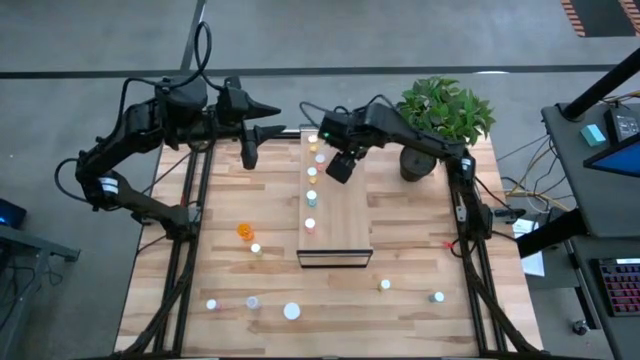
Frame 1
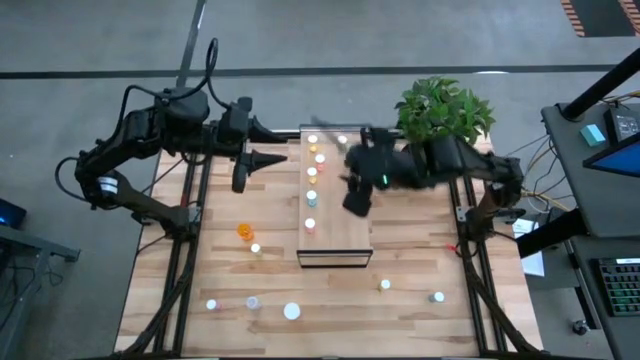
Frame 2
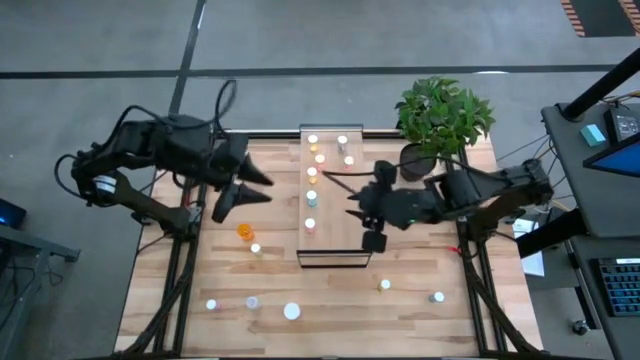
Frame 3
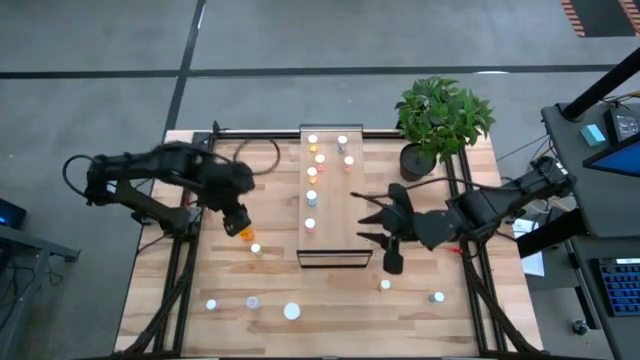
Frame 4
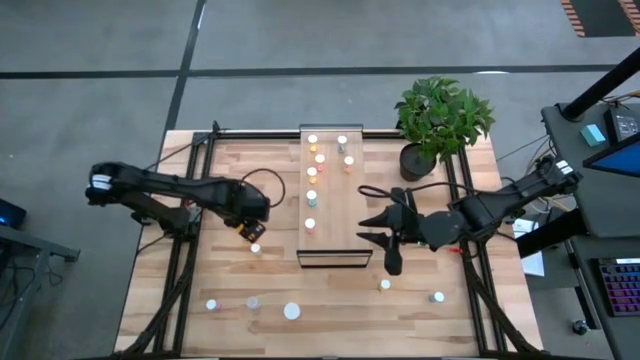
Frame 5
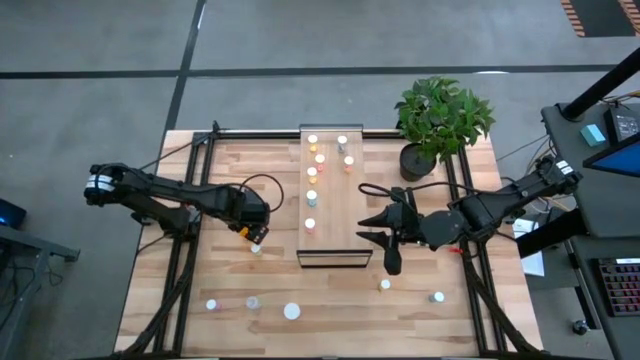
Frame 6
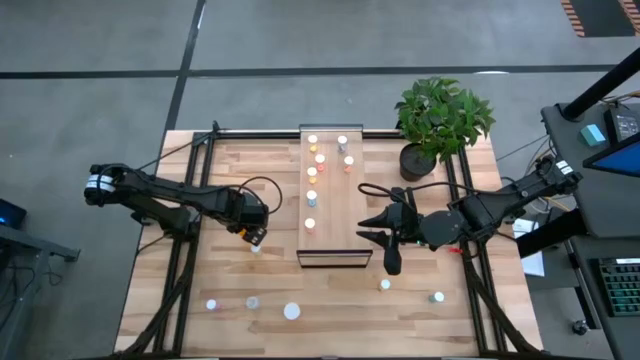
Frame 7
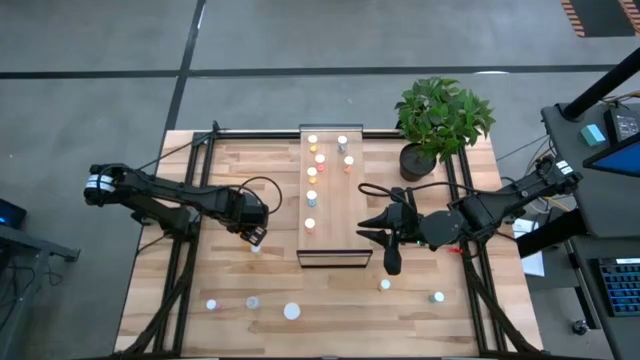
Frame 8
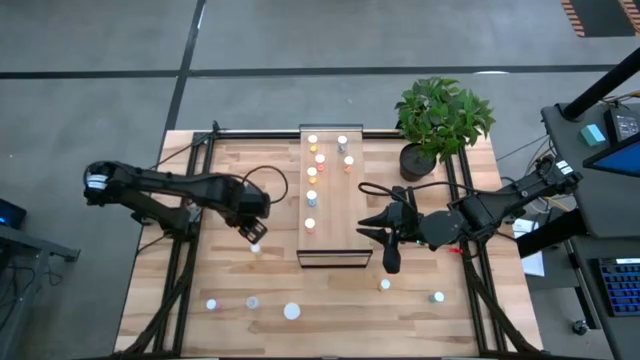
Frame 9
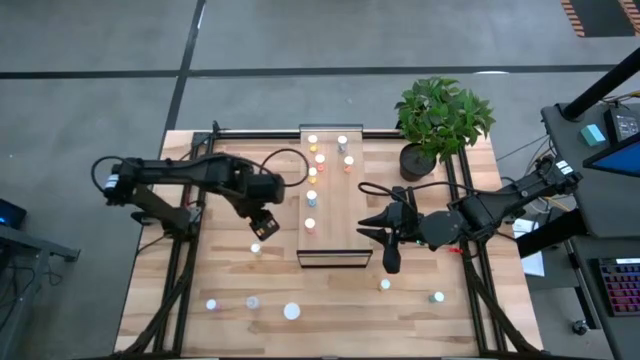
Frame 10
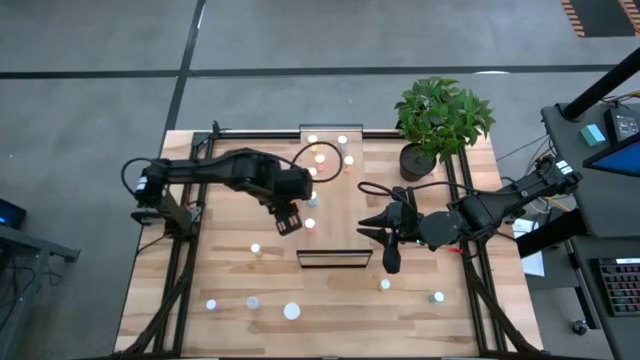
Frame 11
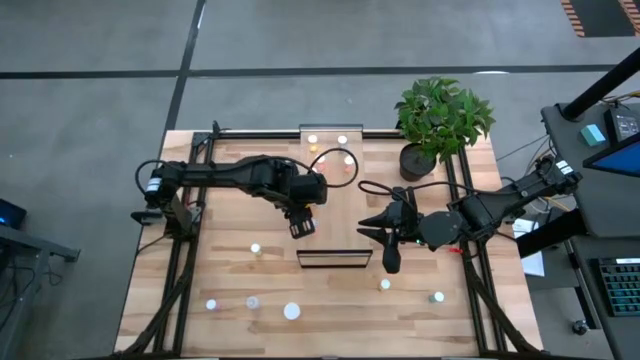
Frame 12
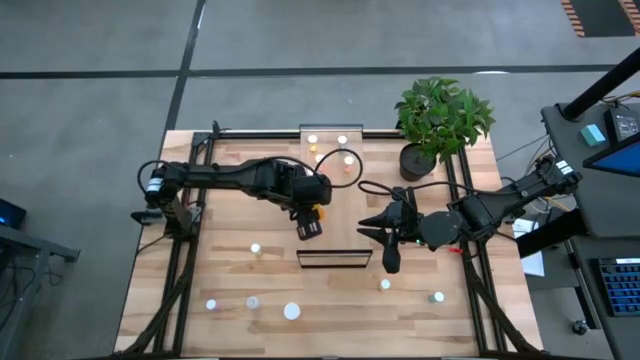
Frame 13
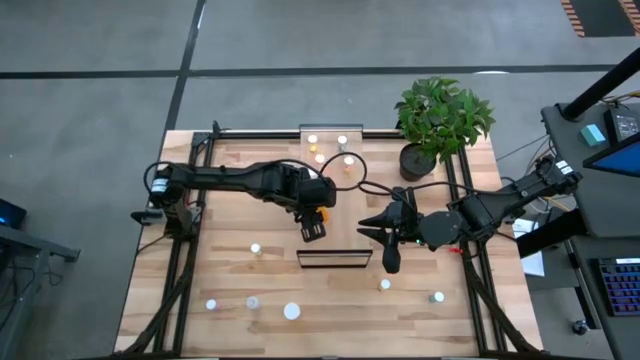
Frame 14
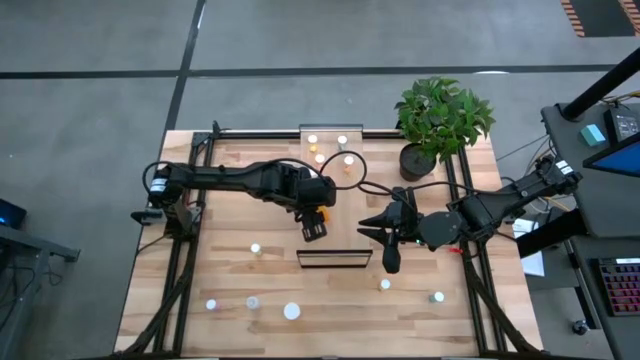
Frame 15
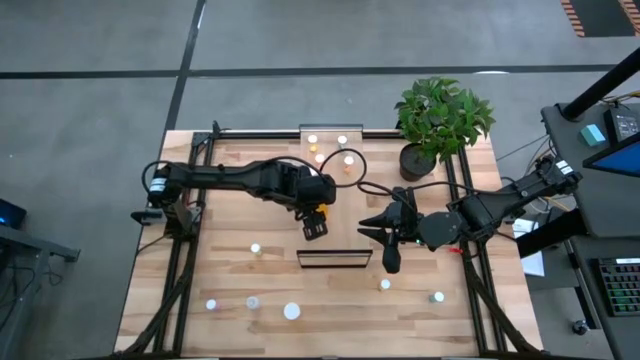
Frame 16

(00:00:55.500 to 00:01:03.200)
Task: Pick and place medicine bottles onto shelf by color
Put the top orange bottle on the shelf

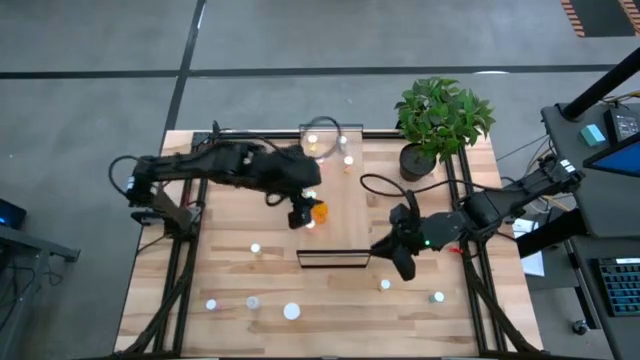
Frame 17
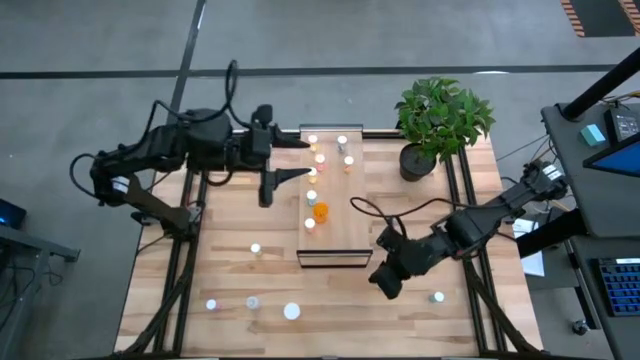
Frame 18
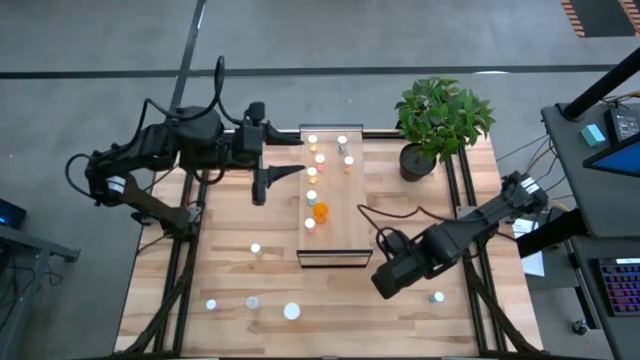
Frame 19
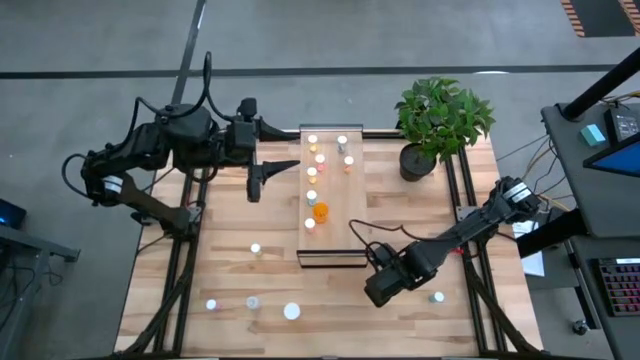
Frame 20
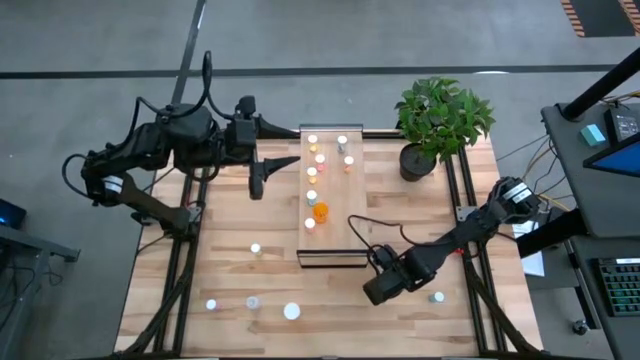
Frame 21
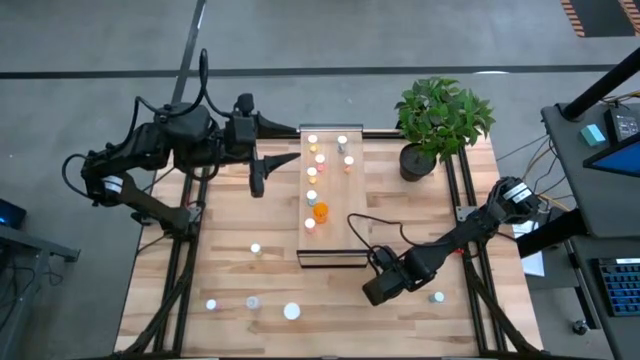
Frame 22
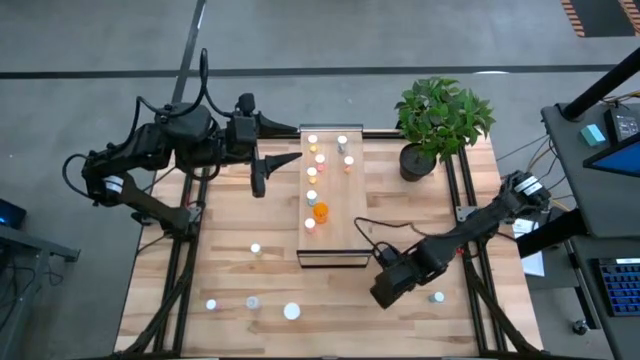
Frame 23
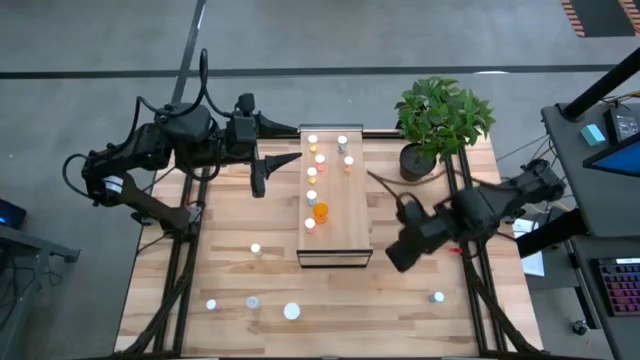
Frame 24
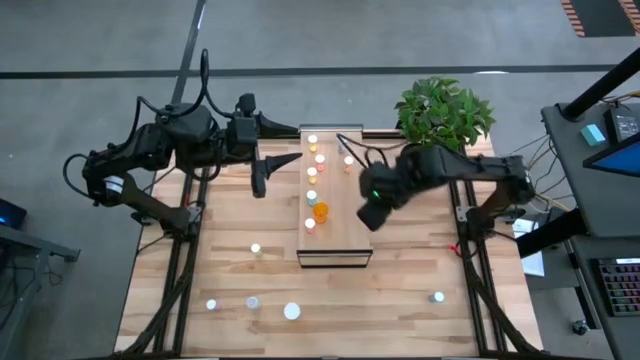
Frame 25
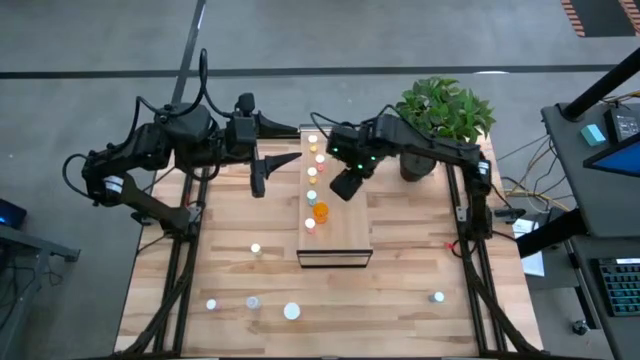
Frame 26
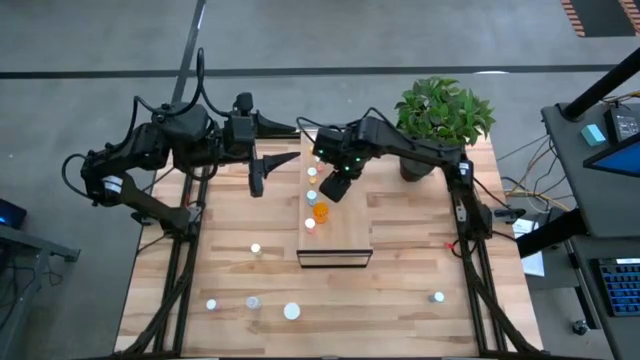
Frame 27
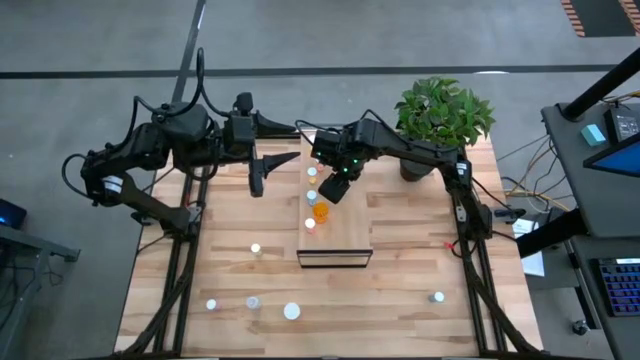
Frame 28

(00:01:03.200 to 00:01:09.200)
Put the right yellow bottle on the shelf

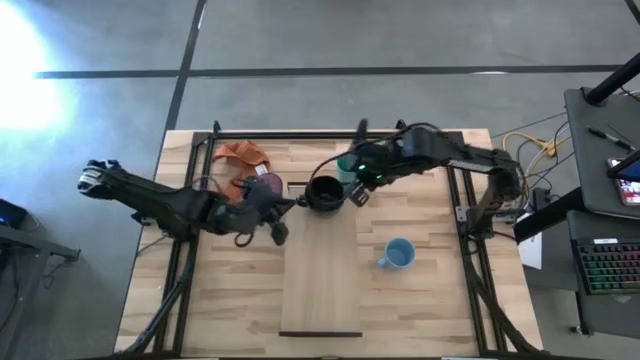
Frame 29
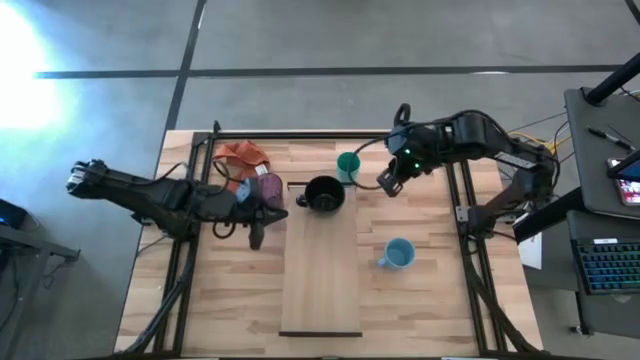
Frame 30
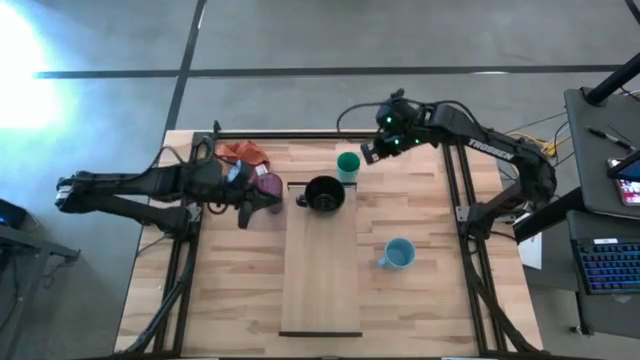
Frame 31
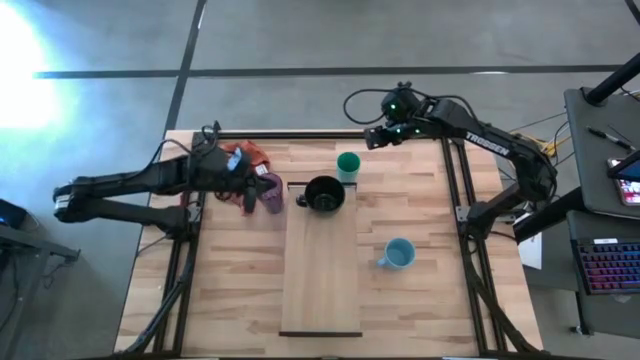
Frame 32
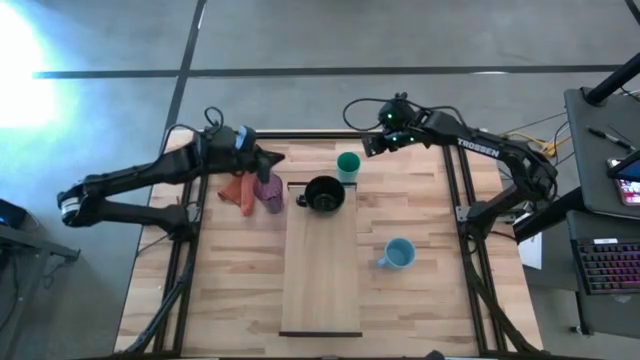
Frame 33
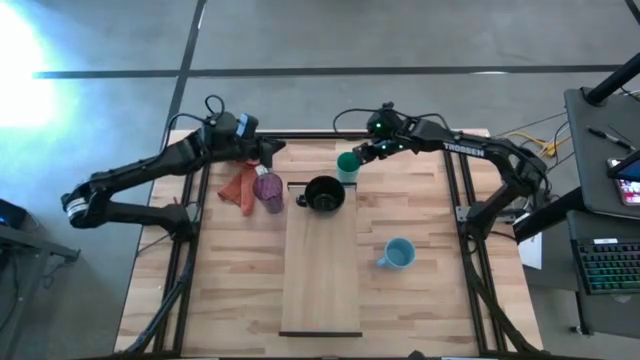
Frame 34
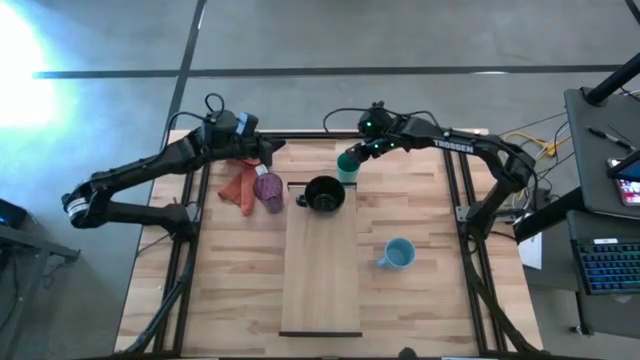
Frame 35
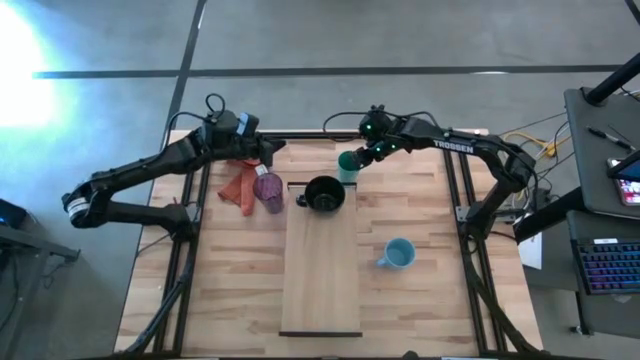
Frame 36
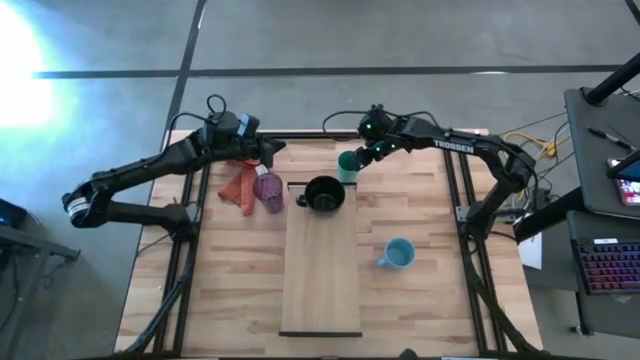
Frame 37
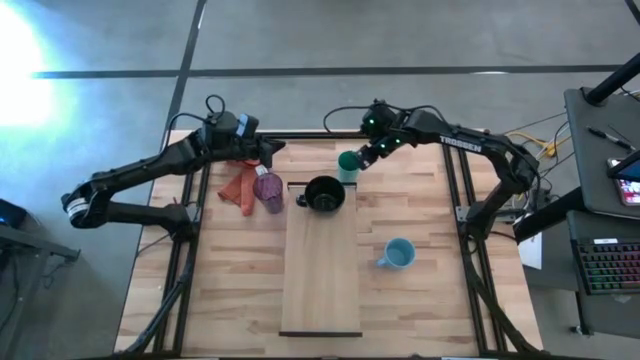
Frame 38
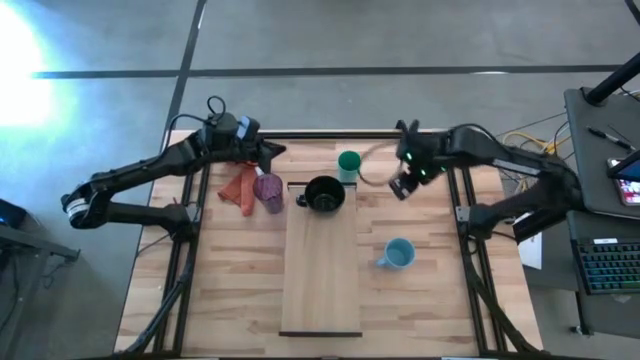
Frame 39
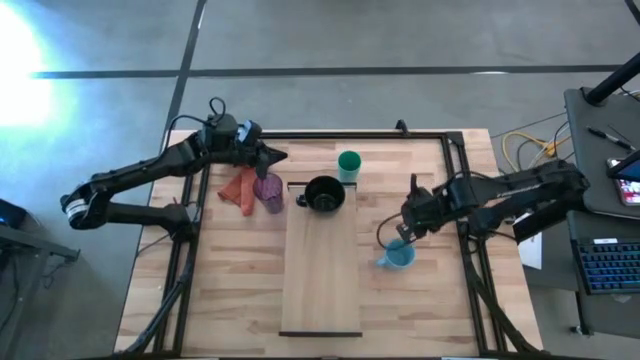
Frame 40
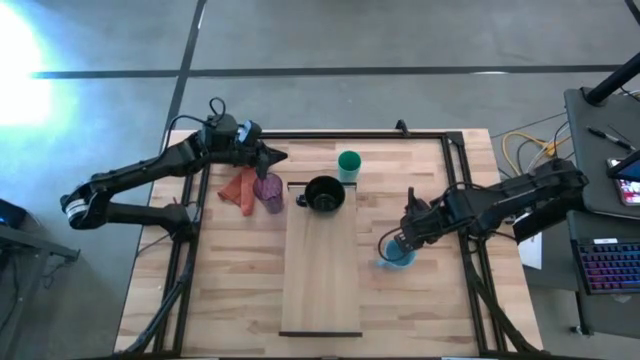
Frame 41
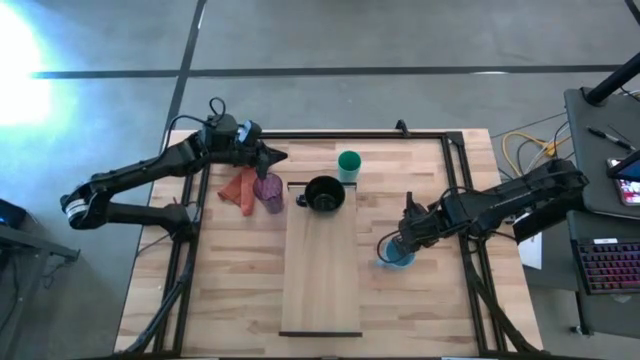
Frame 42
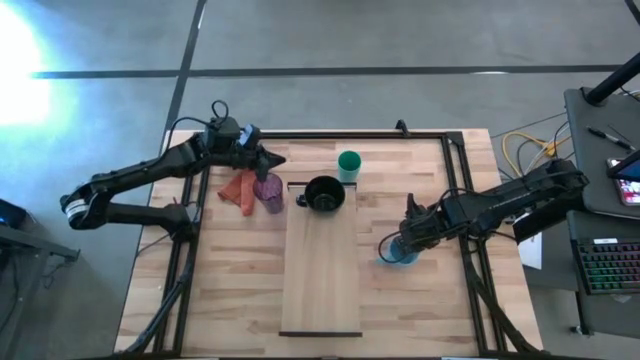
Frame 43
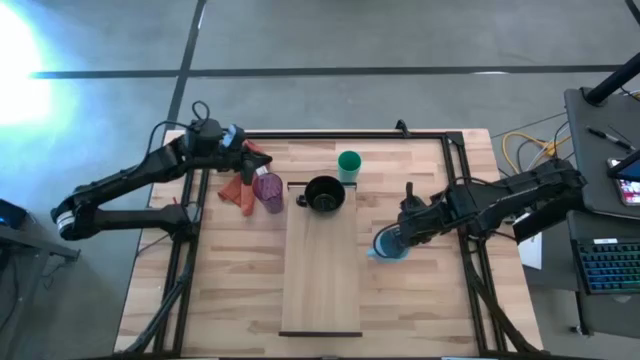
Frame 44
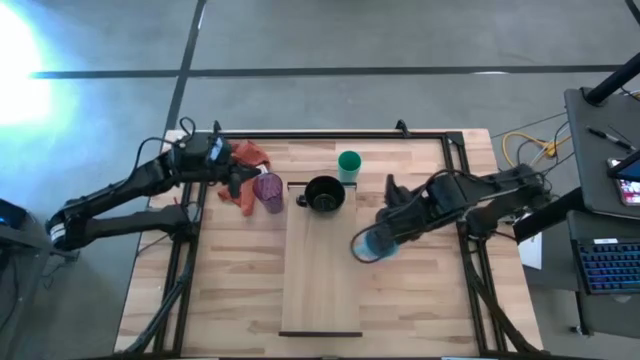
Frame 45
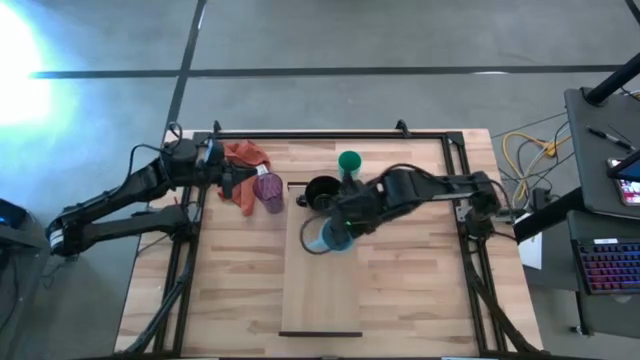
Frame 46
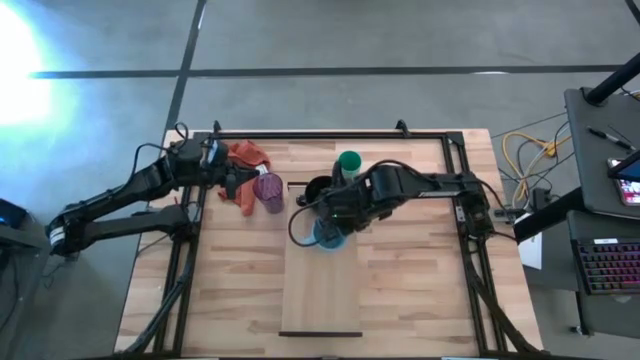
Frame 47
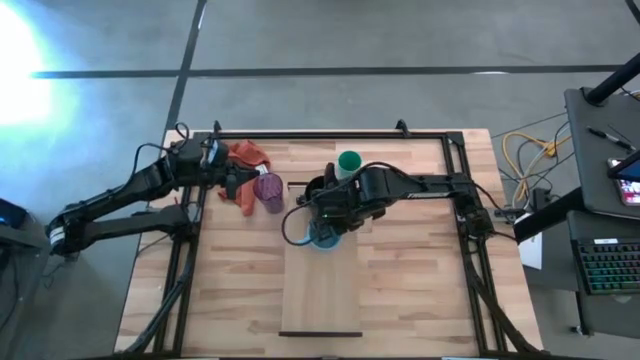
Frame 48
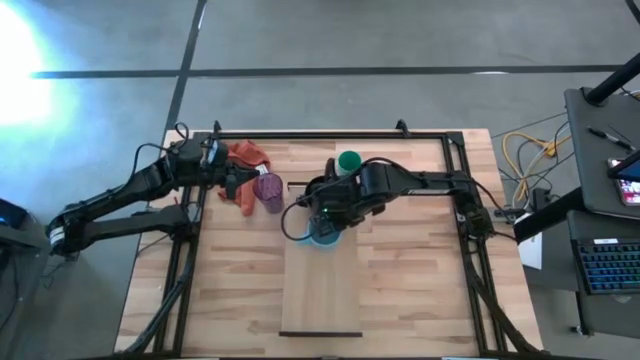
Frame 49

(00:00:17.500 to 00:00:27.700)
Task: Stack small to large cups/mugs on shelf
Put the blue cup on the shelf
